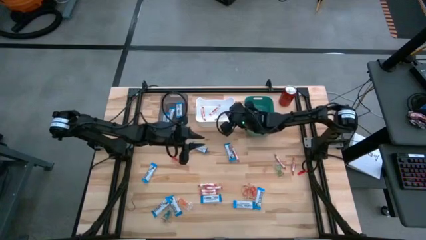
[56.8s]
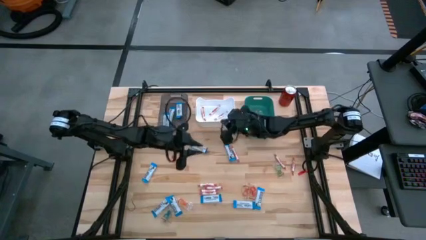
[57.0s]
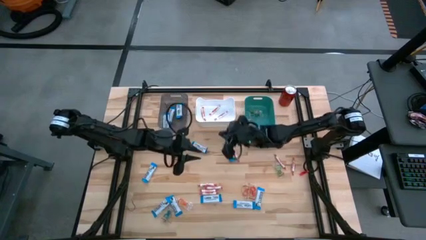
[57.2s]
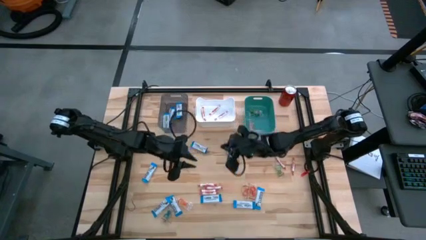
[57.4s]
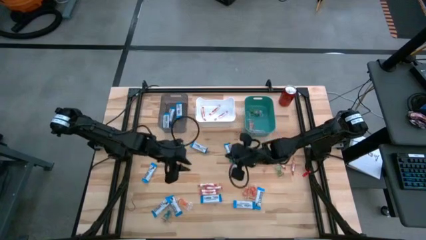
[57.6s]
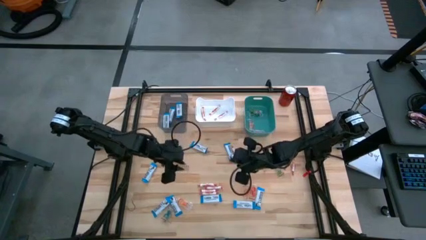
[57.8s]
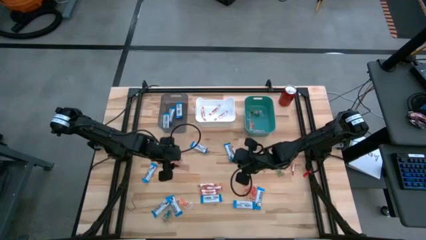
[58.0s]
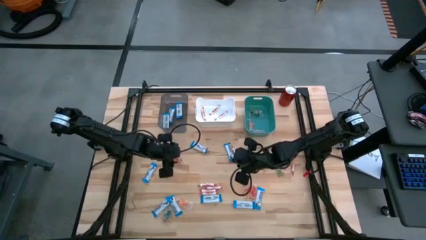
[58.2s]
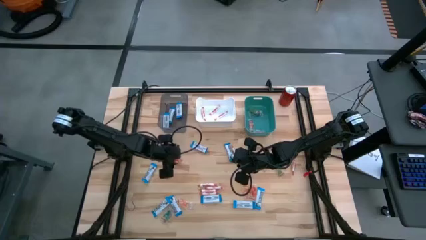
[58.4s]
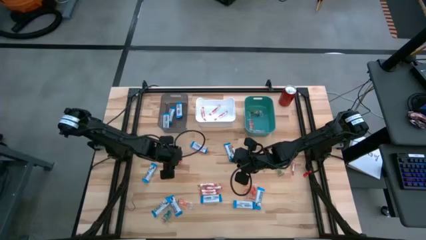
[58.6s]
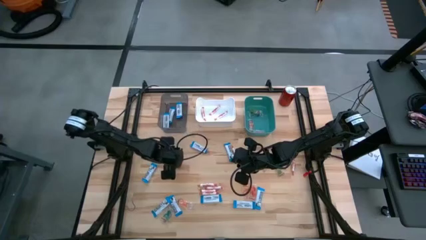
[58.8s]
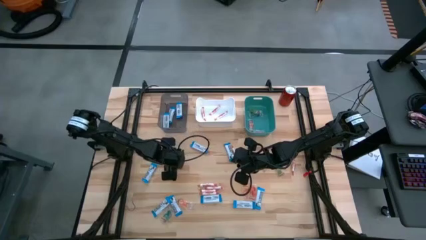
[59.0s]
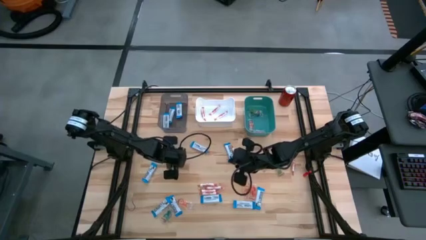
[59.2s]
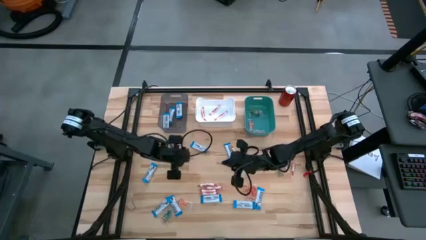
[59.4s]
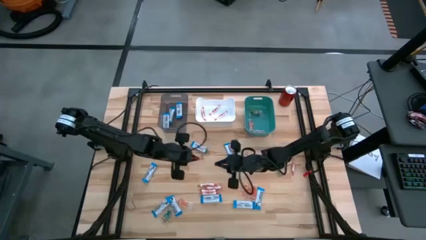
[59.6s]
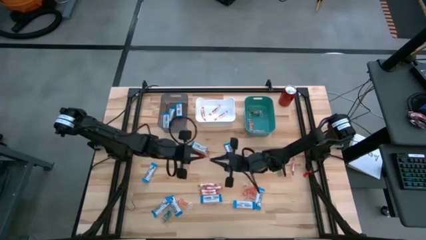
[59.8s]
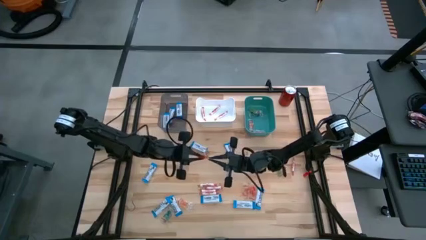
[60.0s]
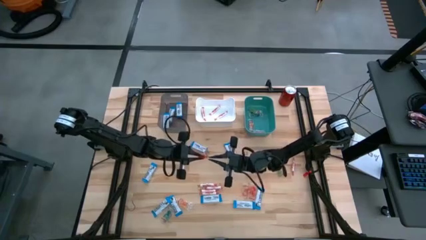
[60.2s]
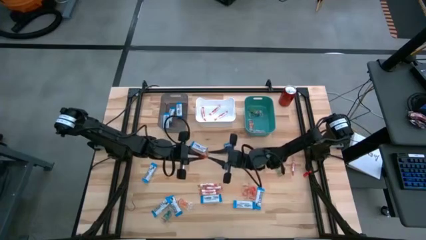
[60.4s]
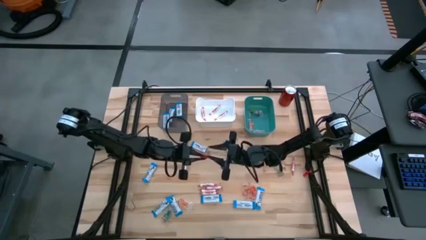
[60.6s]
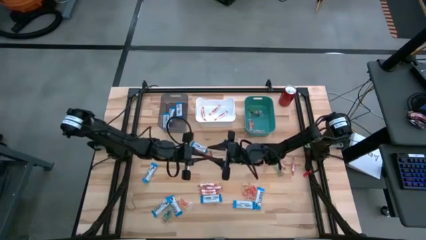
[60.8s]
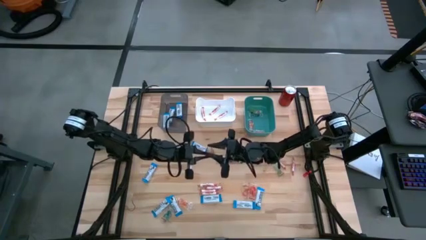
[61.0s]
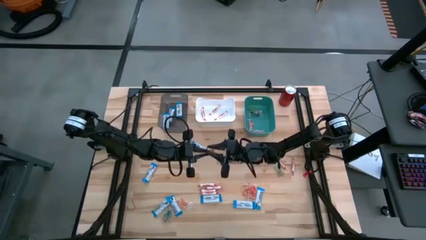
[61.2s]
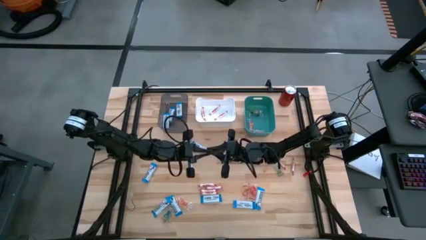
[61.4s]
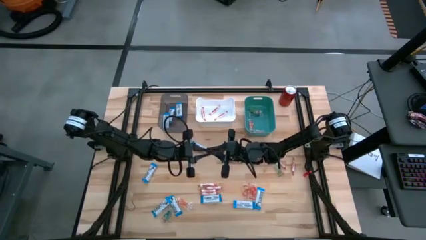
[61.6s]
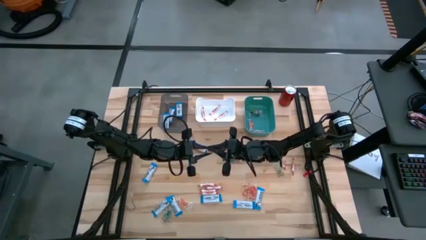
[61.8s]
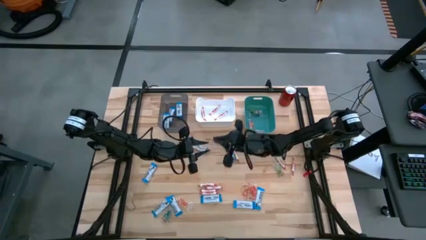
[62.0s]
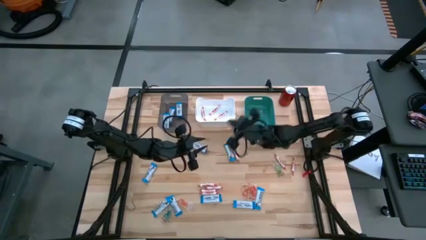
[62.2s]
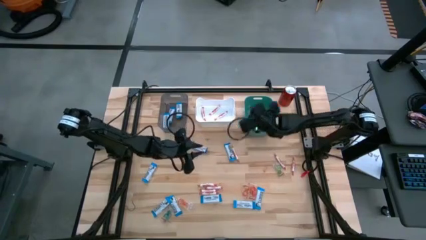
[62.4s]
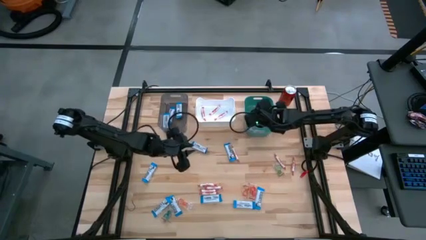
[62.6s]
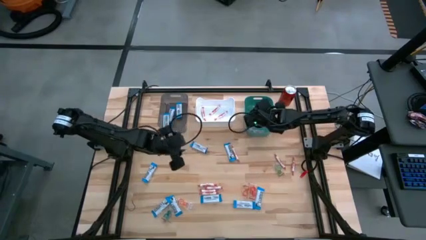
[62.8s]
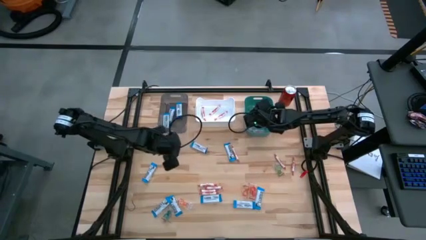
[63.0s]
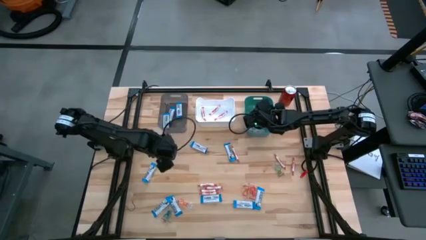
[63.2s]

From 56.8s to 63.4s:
Task: Sort candy
Put the transparent candy into the green bin

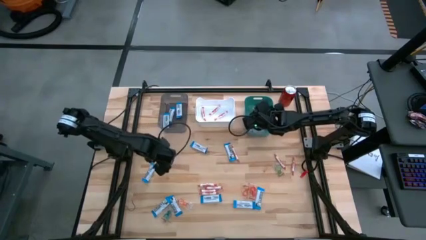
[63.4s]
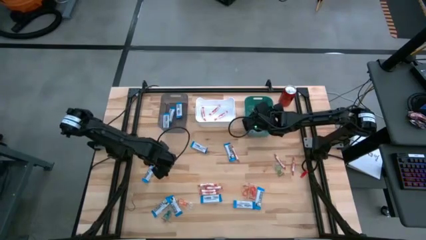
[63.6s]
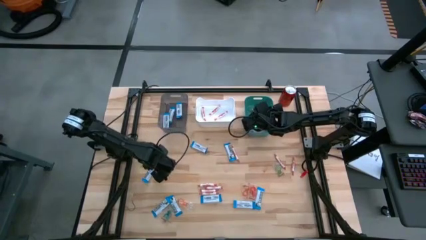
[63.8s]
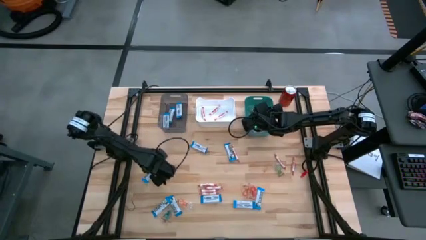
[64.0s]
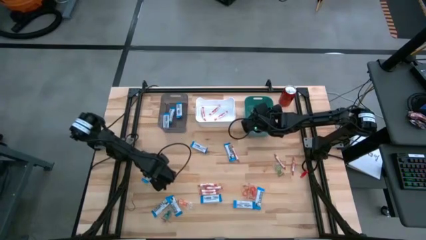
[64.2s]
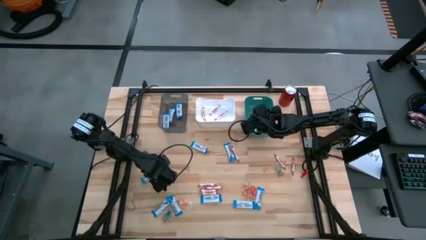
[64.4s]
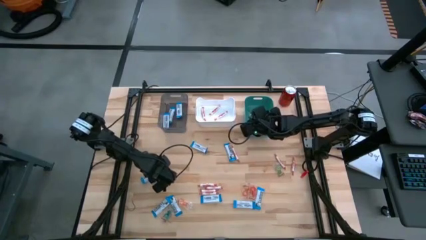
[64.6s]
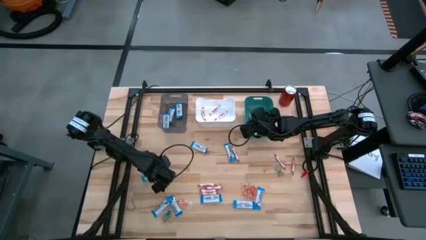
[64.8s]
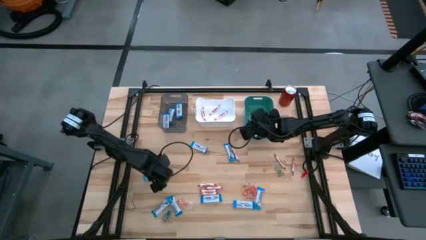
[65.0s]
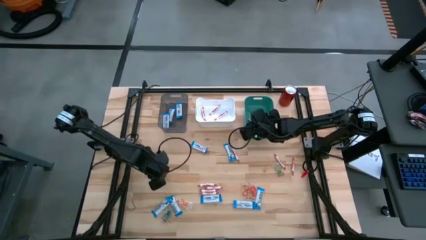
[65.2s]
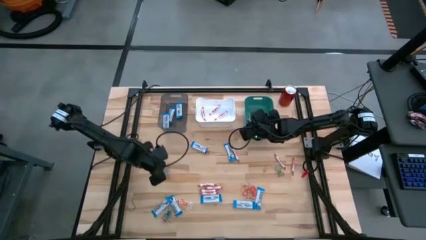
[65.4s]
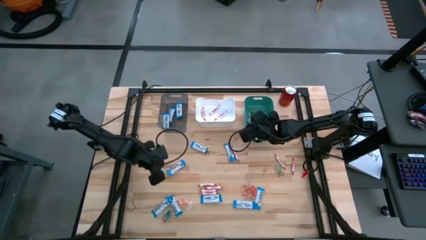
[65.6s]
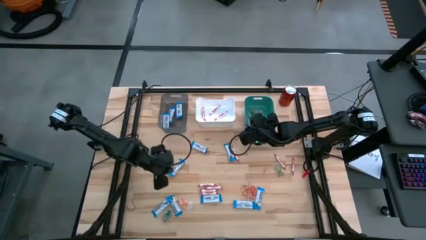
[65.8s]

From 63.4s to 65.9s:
Put the white chocolate into the gray bin

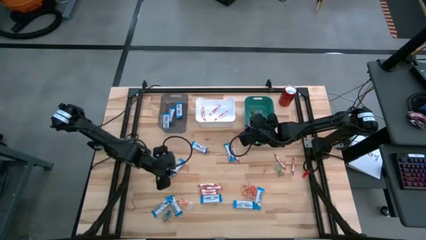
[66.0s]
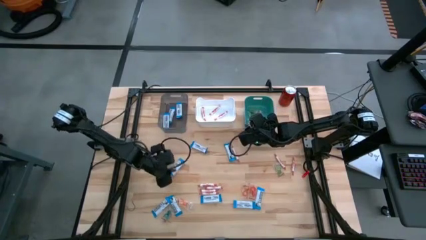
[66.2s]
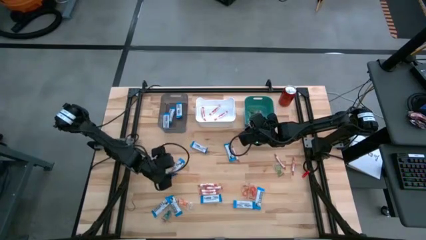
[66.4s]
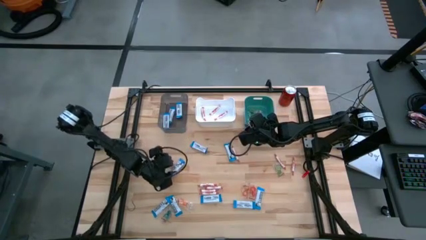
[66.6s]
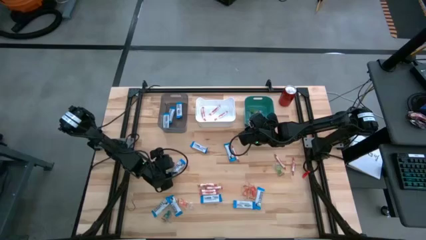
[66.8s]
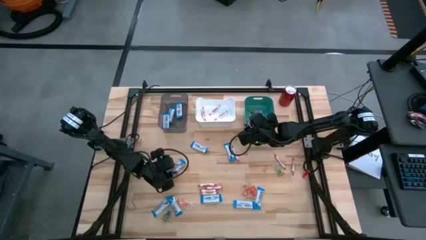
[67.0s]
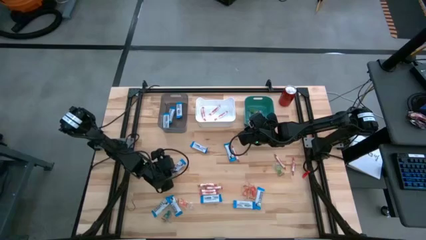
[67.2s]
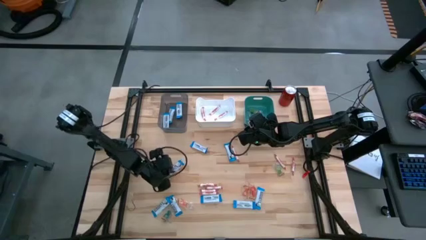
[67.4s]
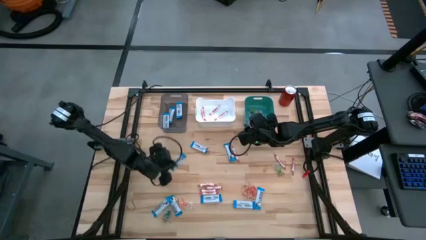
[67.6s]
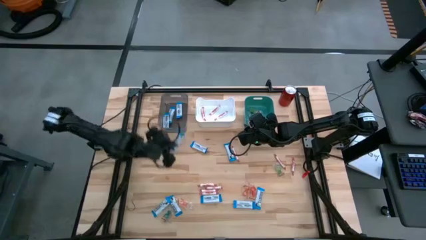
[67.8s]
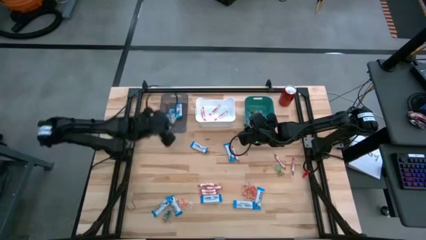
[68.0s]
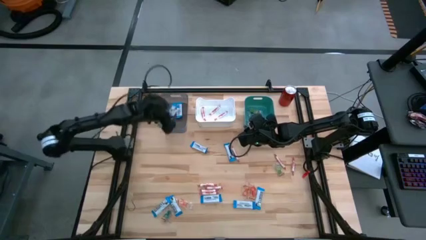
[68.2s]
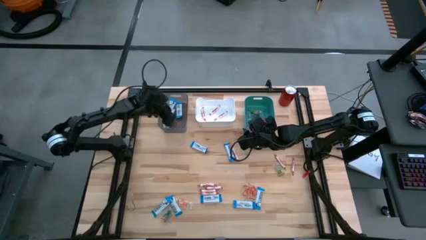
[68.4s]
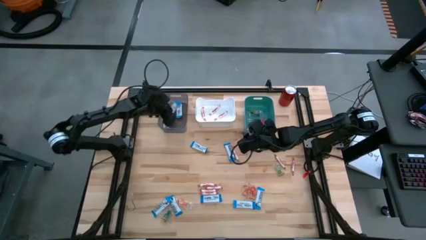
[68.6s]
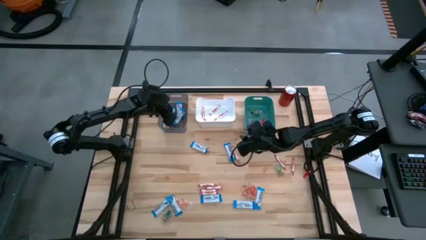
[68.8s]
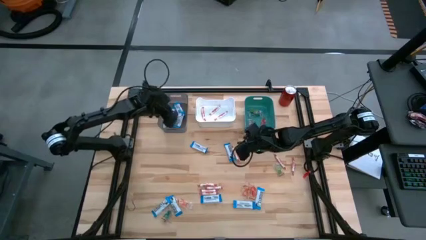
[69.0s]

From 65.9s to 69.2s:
Put the white chocolate into the gray bin

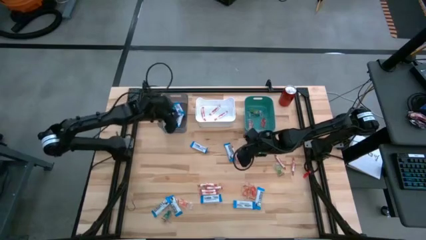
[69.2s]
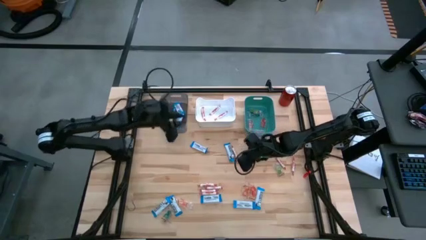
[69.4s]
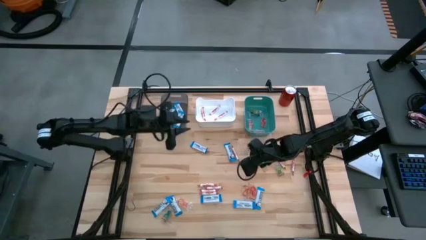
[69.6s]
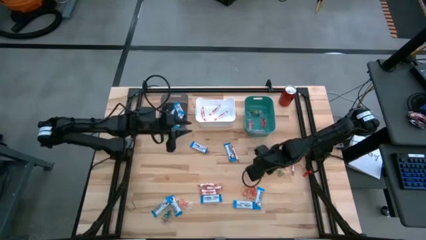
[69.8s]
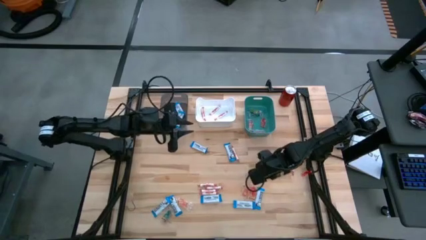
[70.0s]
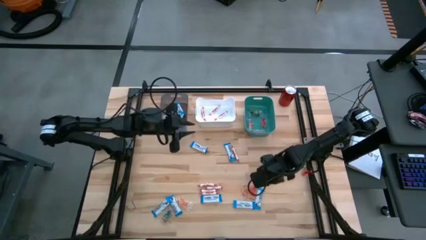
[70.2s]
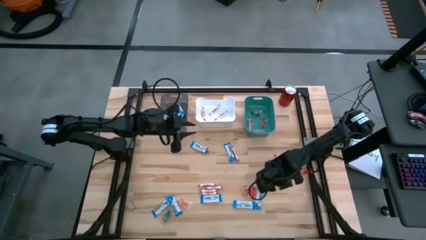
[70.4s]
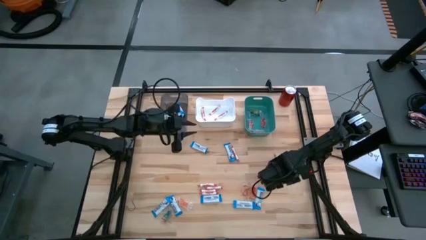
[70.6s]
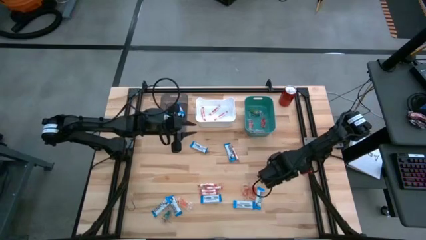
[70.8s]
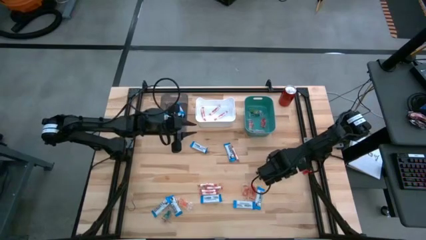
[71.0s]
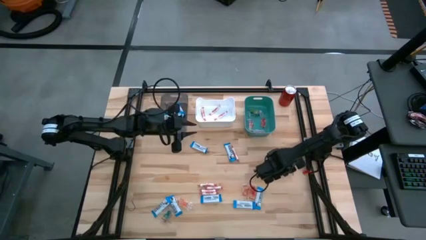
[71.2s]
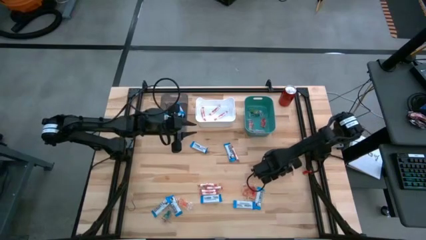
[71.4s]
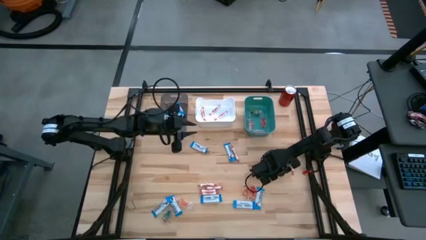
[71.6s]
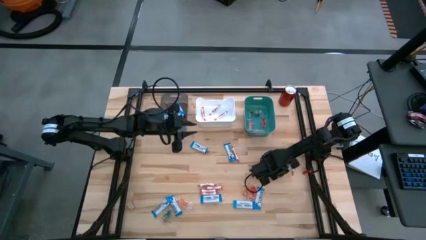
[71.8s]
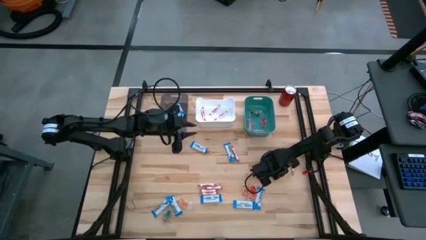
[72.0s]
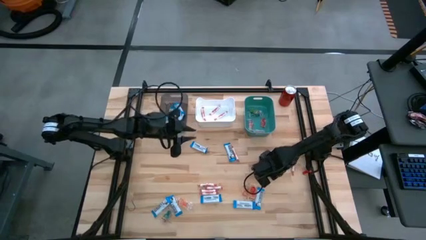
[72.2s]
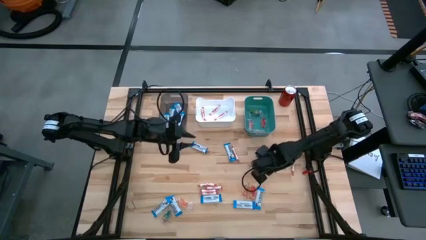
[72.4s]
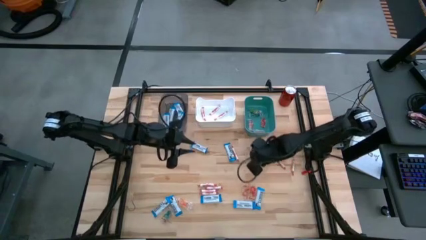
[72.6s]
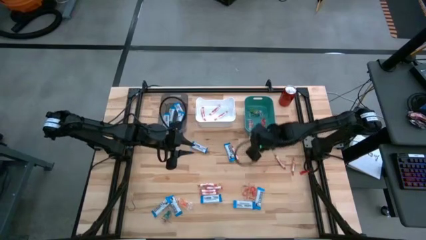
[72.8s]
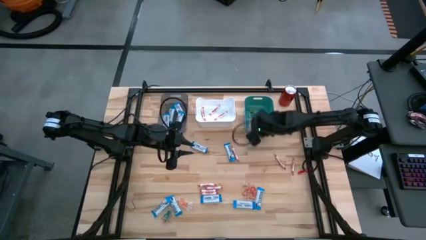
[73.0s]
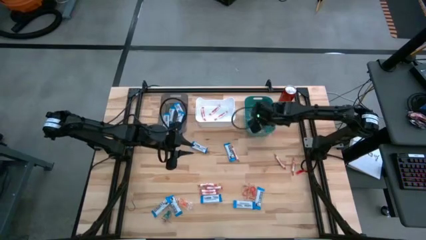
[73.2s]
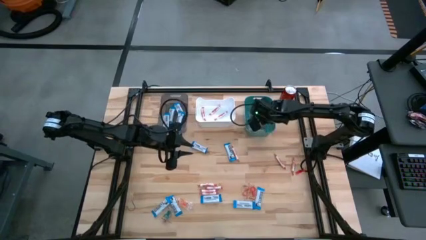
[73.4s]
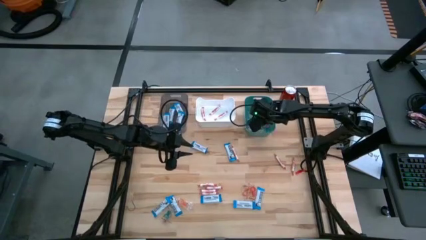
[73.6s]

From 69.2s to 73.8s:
Put the transparent candy into the green bin
